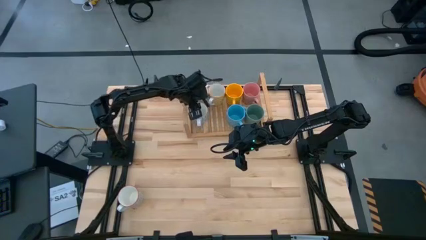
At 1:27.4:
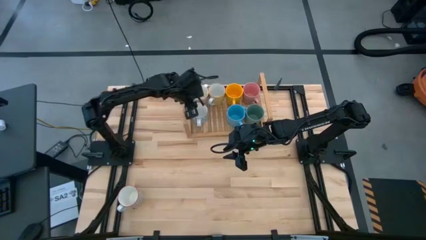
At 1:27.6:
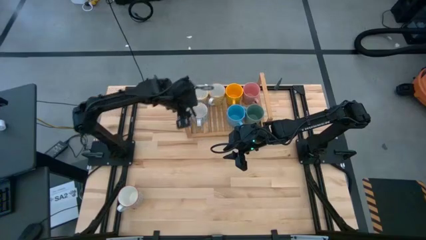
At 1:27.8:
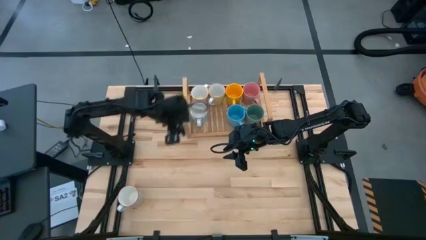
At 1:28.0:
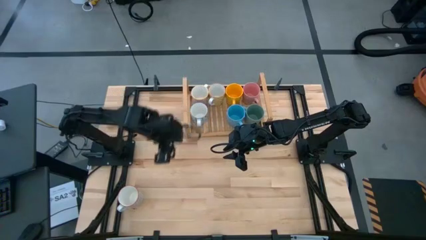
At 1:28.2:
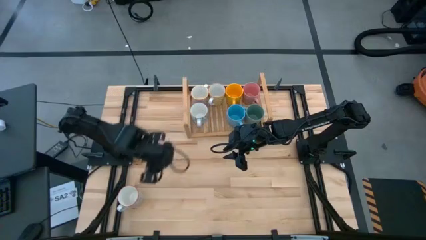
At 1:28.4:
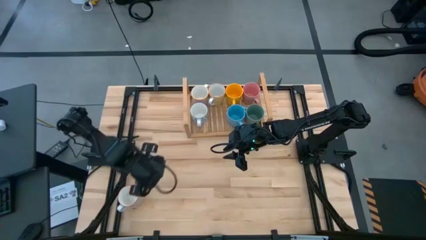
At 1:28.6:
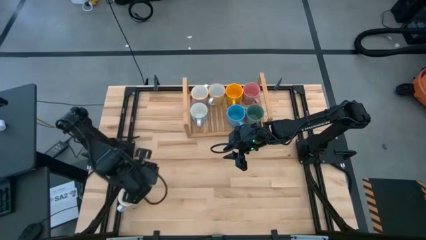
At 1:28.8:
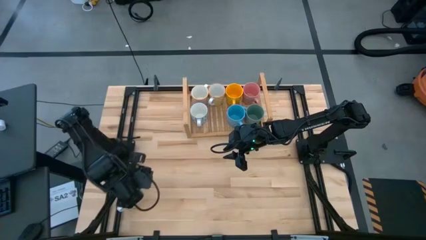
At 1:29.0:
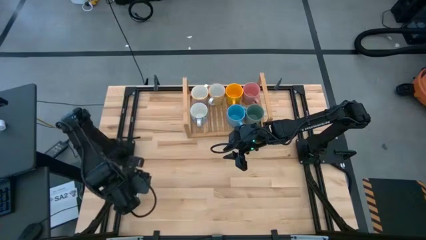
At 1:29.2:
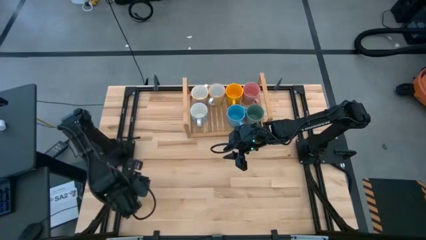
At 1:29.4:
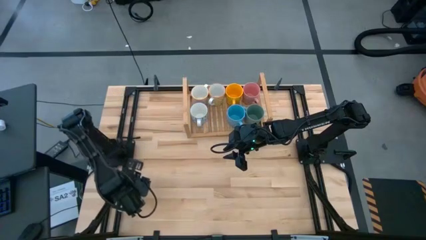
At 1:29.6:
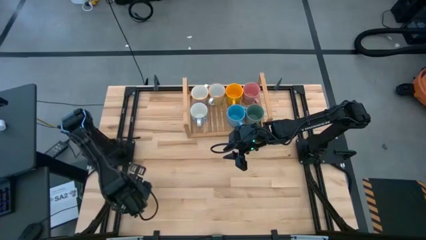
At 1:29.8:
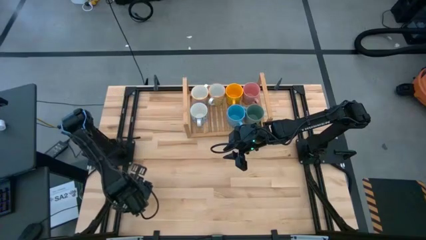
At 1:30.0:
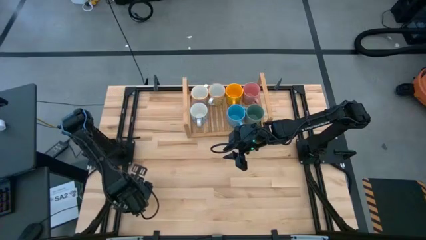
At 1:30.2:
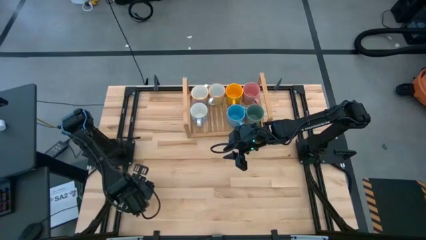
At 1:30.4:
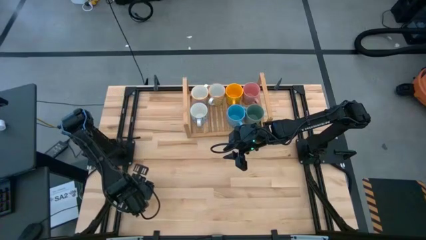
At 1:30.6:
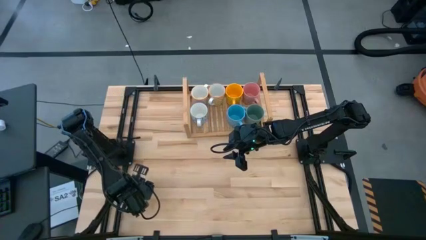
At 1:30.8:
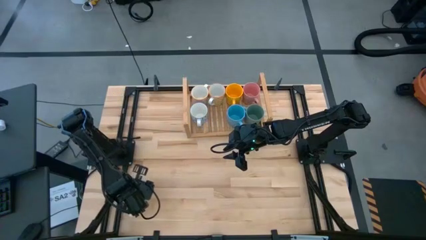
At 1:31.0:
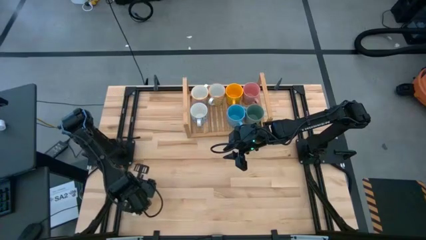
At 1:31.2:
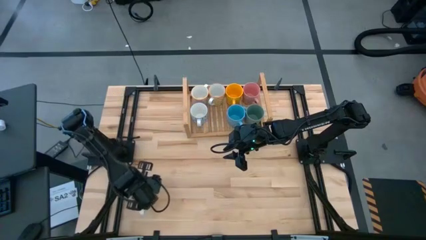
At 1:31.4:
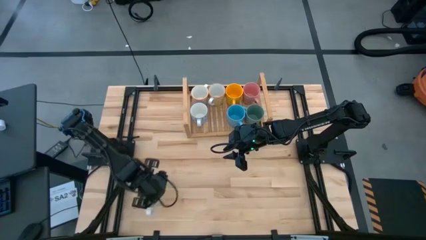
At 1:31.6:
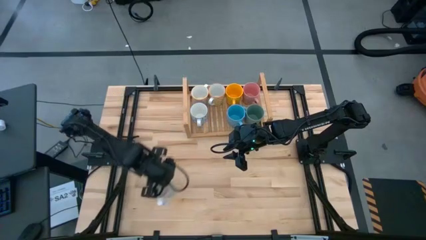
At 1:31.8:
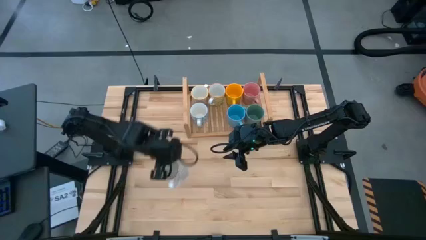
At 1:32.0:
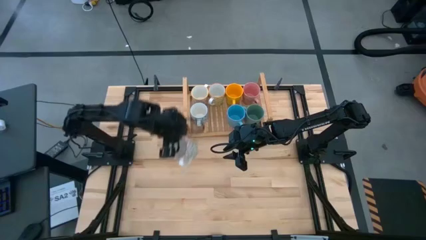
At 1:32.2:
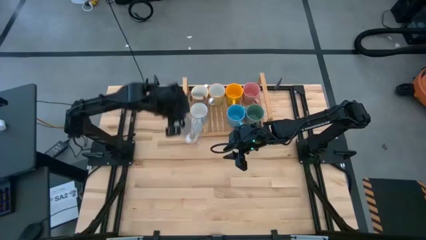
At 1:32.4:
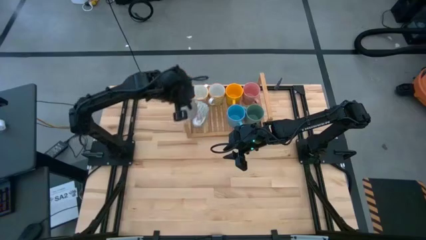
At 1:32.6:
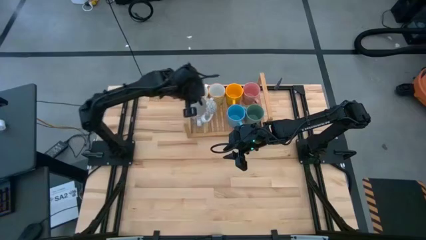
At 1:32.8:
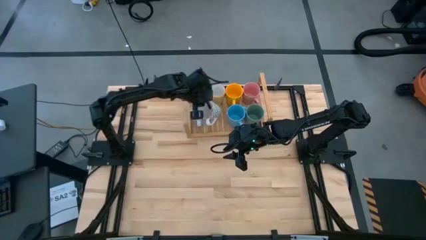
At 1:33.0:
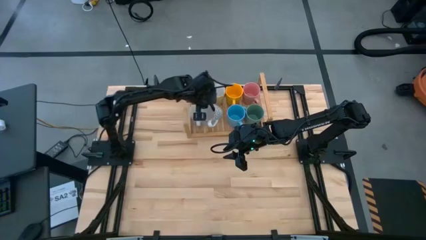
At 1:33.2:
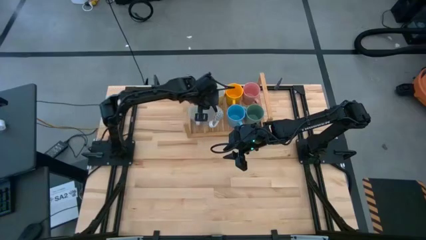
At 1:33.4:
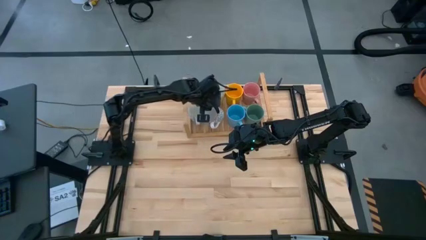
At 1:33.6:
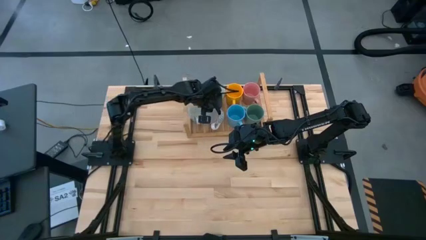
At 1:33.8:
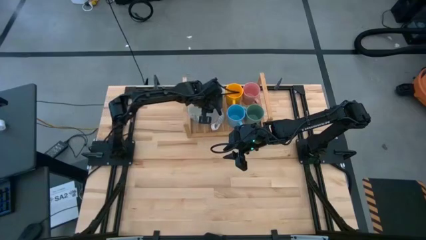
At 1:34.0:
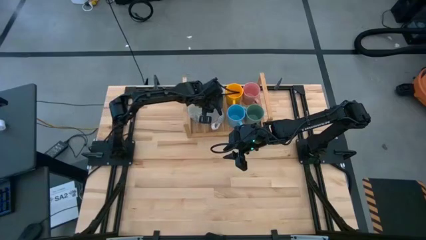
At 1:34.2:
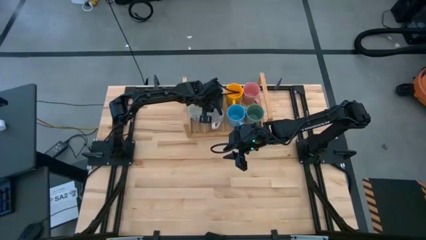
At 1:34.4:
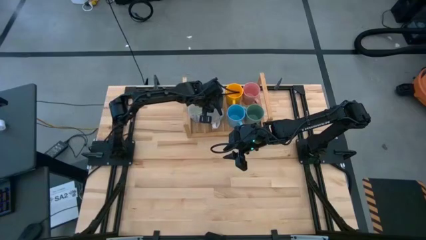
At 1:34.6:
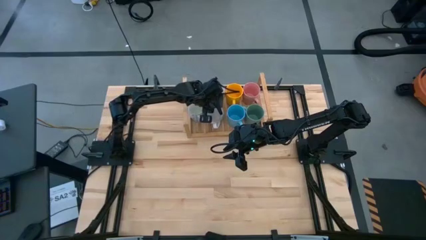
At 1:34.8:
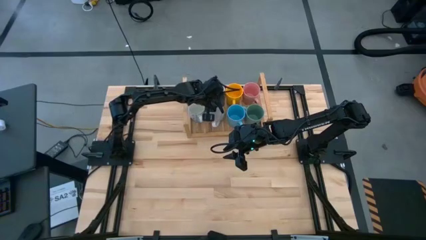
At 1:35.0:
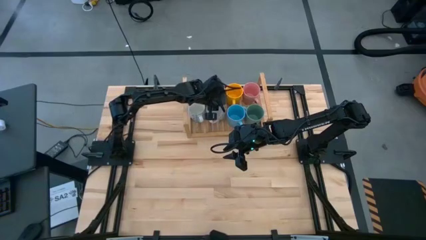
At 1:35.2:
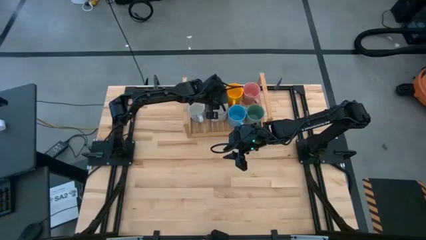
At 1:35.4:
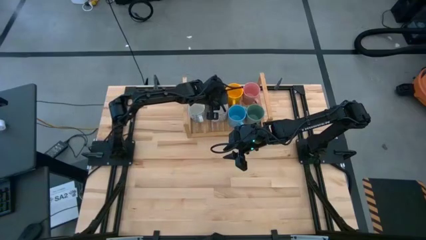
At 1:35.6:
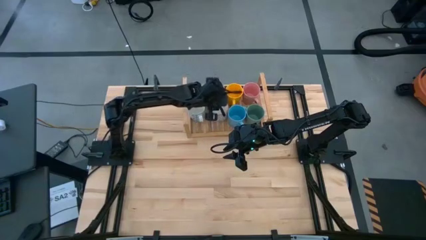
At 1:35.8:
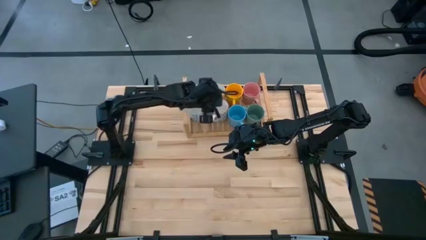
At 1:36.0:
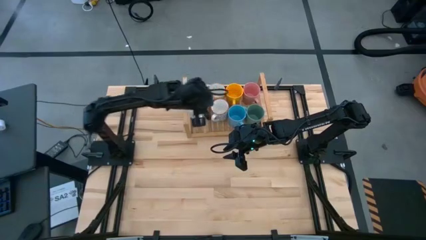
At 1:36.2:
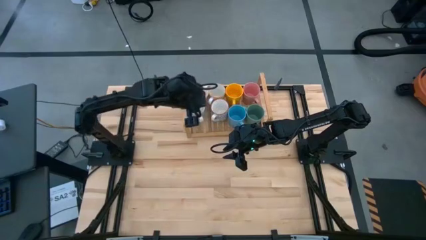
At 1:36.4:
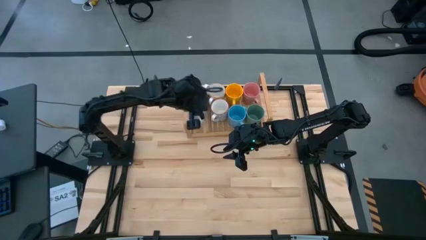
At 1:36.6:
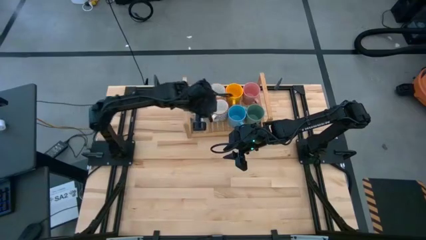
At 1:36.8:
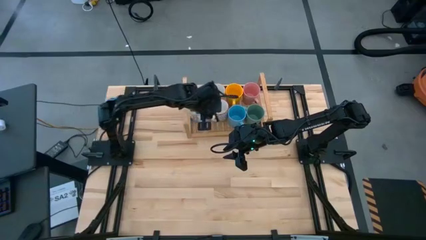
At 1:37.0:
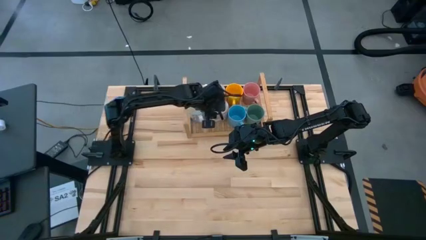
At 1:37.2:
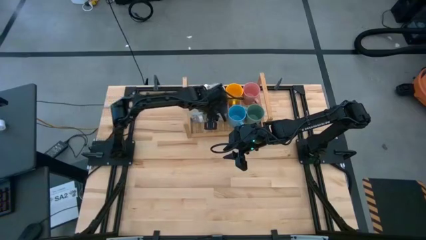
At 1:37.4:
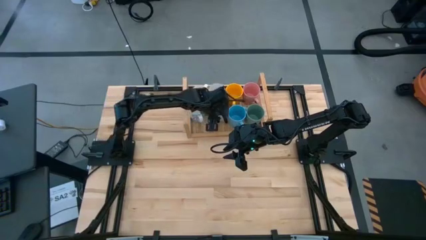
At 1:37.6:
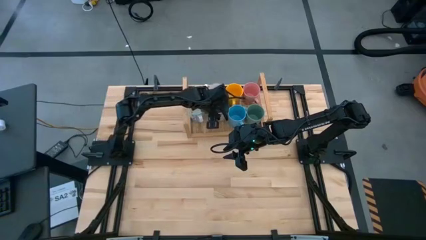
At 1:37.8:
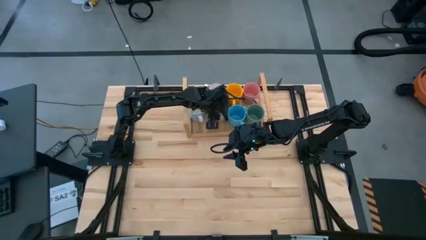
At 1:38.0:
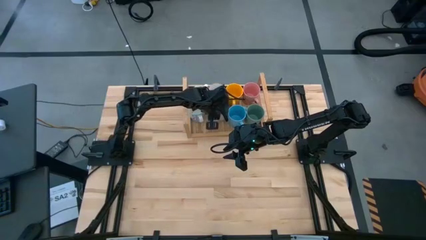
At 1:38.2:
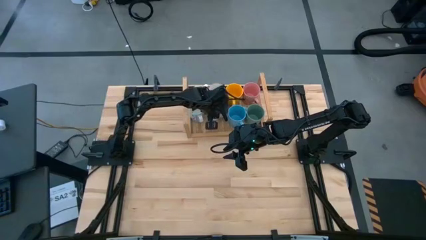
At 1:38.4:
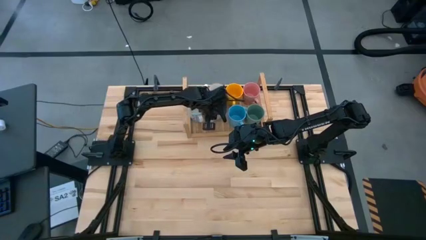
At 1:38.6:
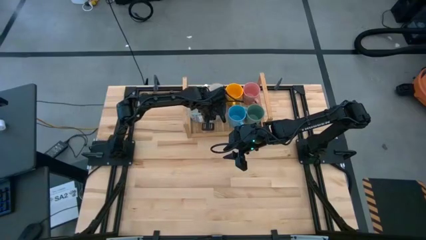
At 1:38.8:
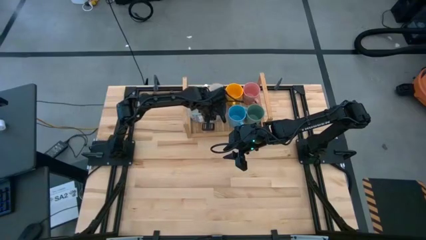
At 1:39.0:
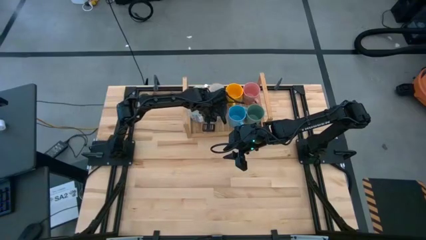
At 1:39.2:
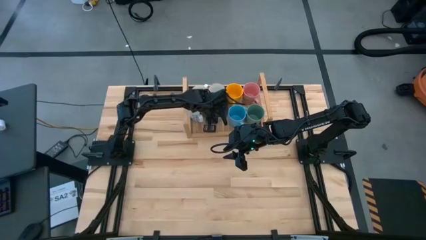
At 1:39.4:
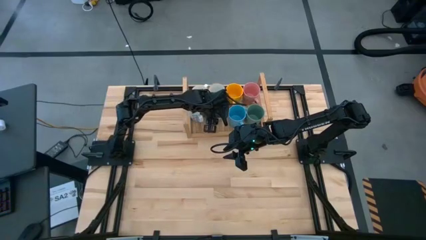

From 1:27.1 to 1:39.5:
Task: Place coffee mugs
Put the gray patterned mug on the shelf

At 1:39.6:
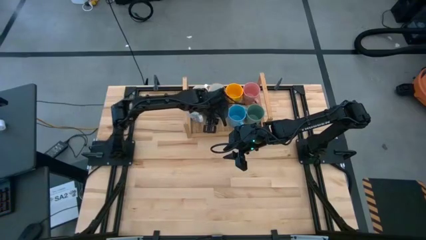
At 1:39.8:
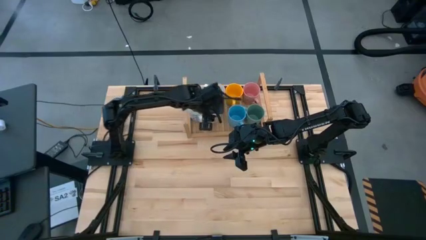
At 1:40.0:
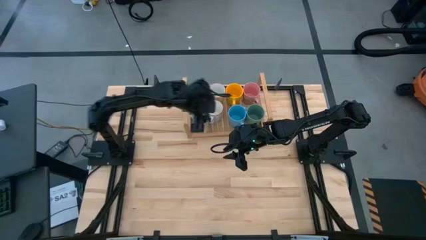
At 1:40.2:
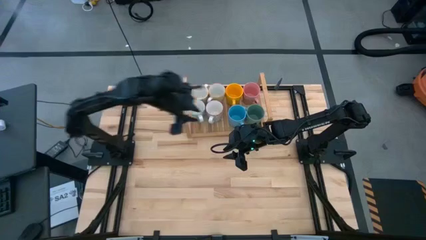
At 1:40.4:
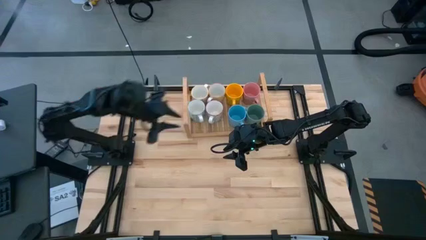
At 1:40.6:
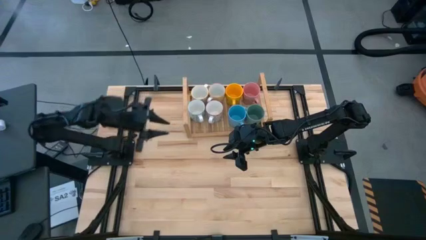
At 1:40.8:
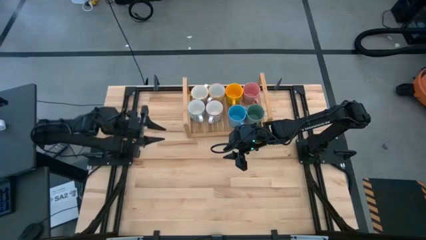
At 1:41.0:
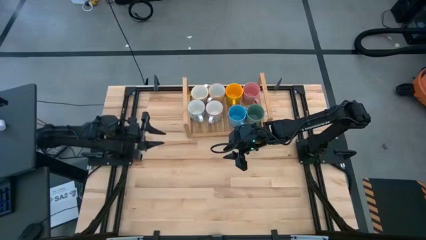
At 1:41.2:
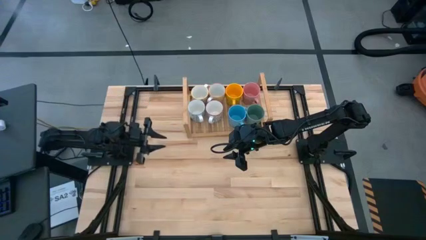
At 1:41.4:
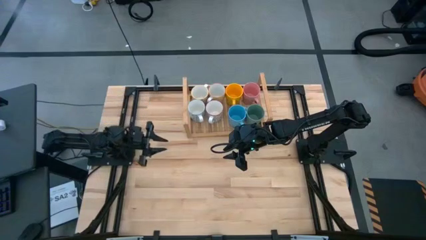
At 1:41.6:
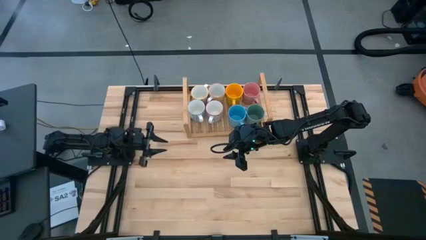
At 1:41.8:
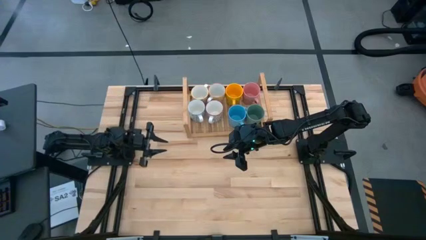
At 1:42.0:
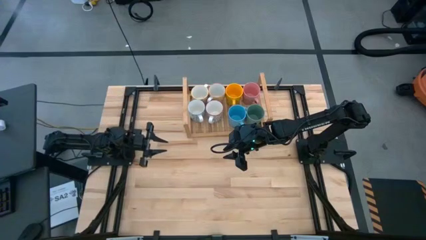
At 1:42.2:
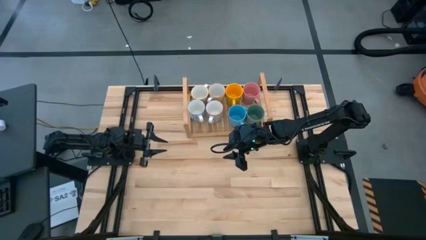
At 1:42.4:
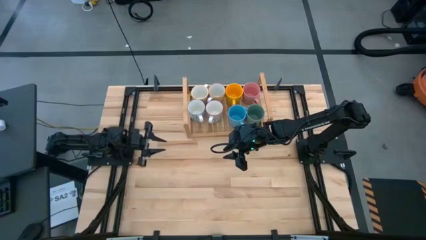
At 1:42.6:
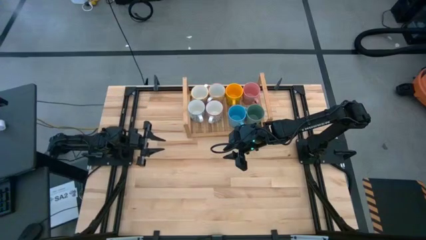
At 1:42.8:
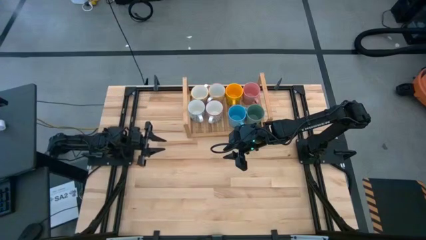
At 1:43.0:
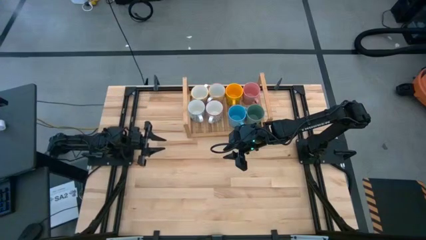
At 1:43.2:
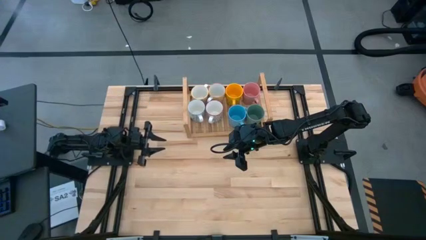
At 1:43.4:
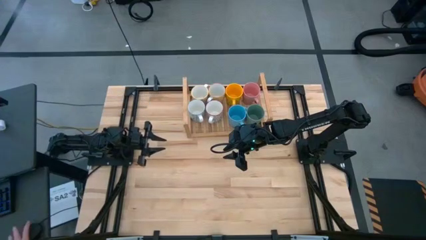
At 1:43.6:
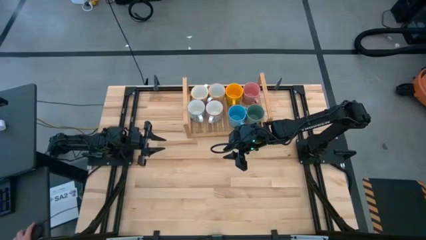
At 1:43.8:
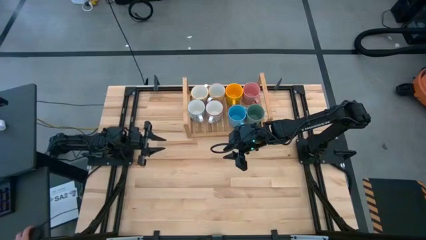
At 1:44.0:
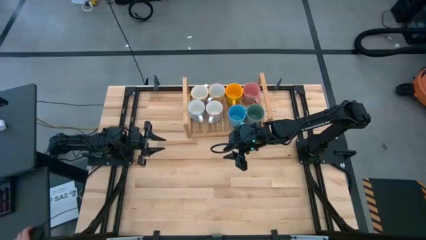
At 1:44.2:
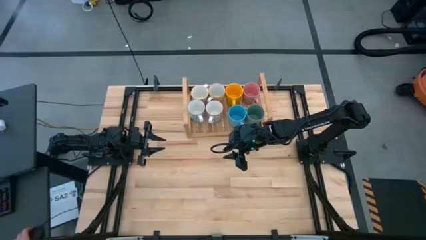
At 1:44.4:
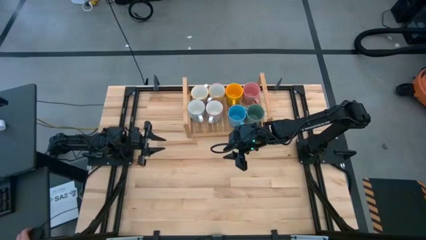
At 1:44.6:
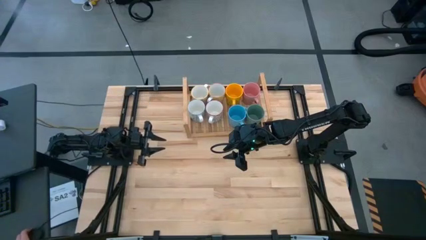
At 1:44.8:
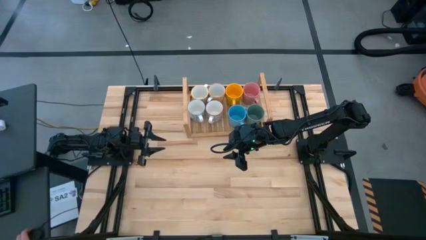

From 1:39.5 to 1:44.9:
Return to Home Position
